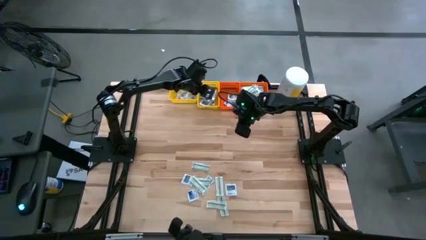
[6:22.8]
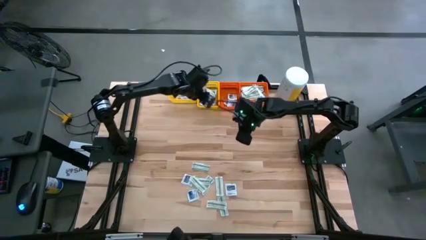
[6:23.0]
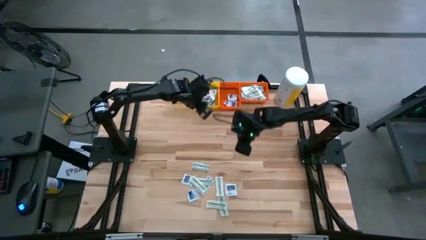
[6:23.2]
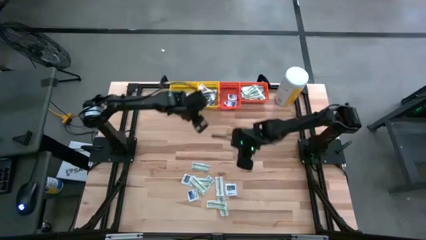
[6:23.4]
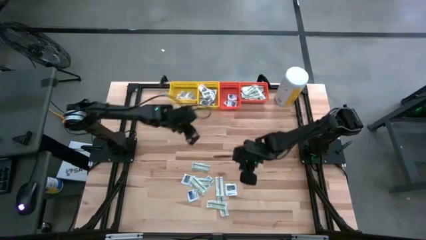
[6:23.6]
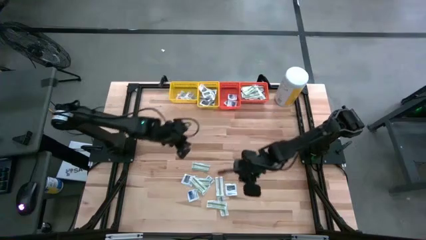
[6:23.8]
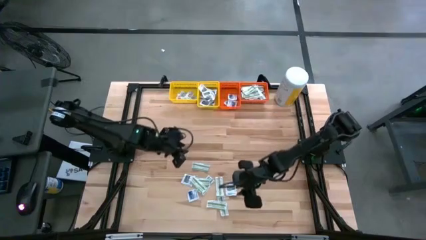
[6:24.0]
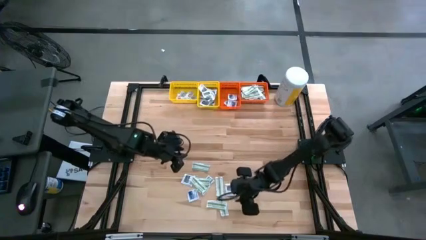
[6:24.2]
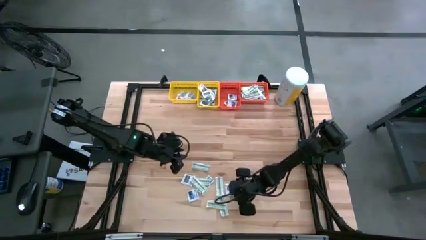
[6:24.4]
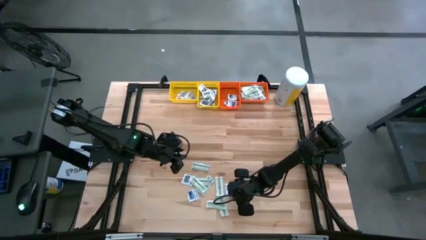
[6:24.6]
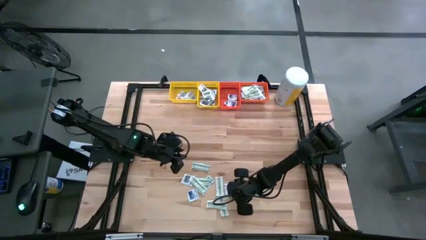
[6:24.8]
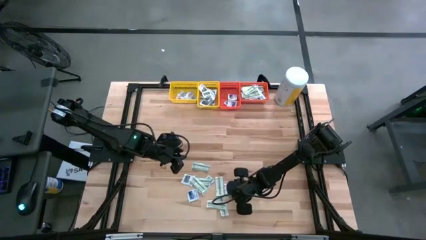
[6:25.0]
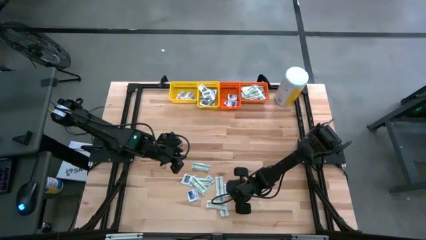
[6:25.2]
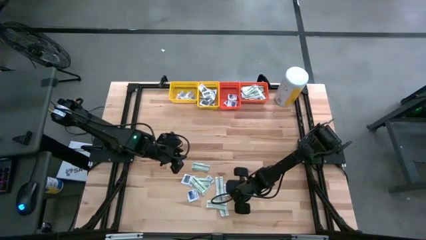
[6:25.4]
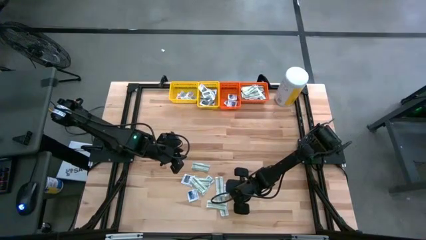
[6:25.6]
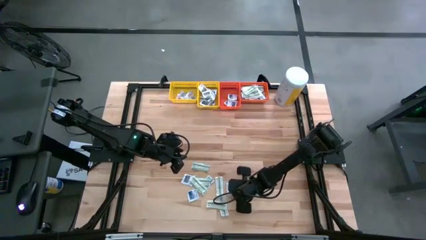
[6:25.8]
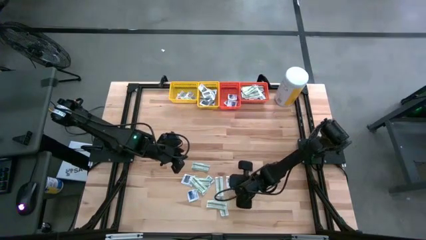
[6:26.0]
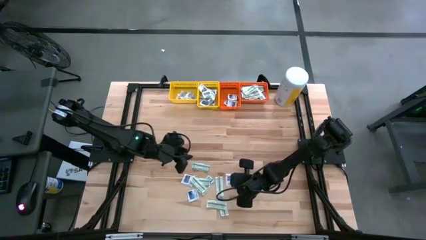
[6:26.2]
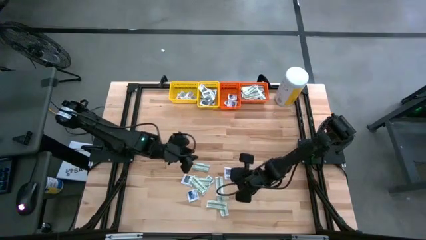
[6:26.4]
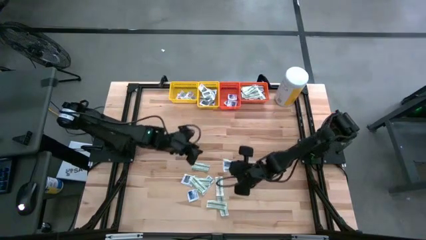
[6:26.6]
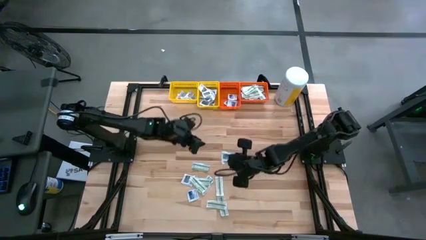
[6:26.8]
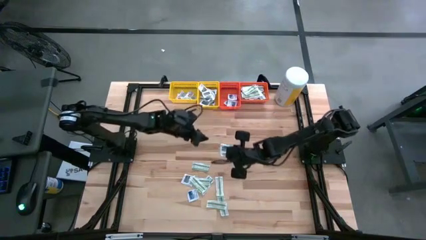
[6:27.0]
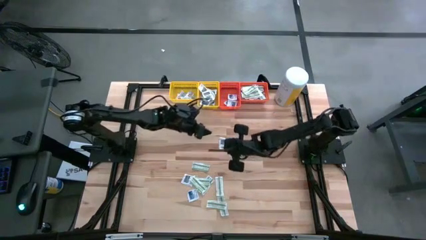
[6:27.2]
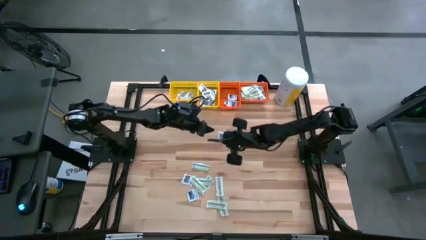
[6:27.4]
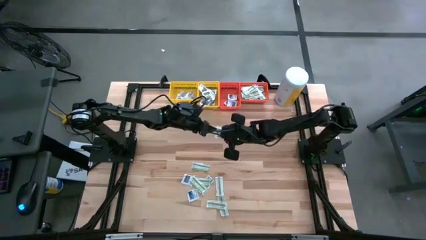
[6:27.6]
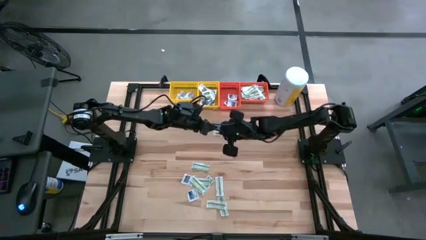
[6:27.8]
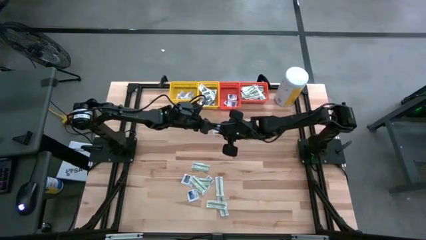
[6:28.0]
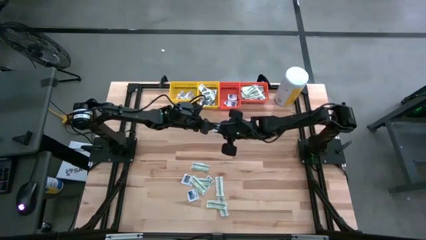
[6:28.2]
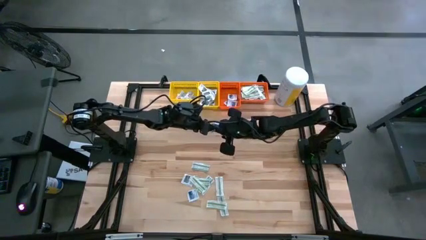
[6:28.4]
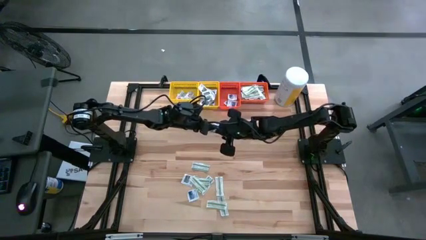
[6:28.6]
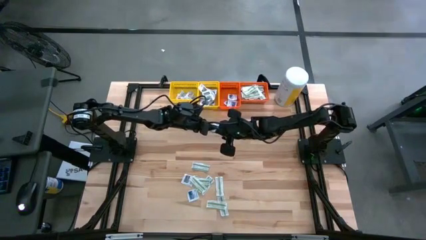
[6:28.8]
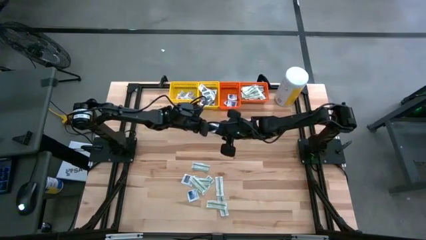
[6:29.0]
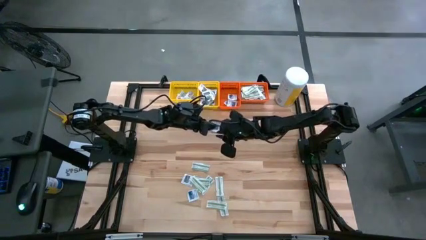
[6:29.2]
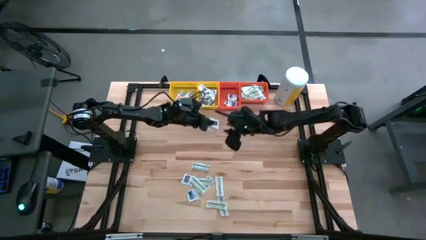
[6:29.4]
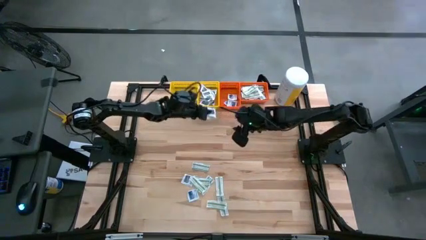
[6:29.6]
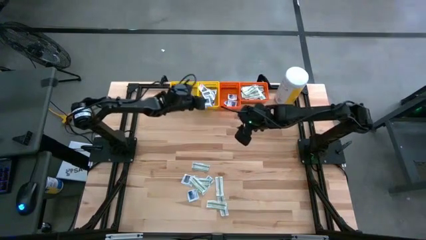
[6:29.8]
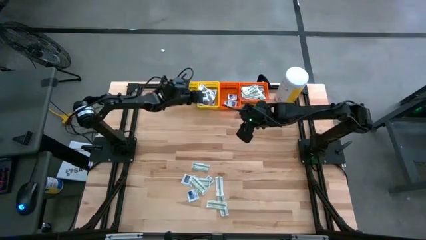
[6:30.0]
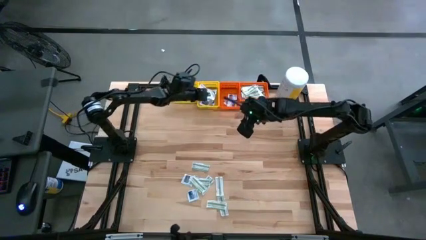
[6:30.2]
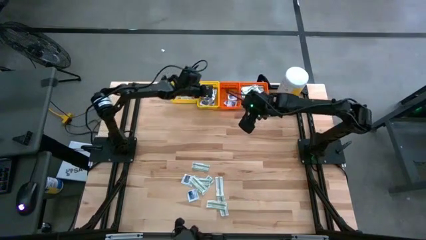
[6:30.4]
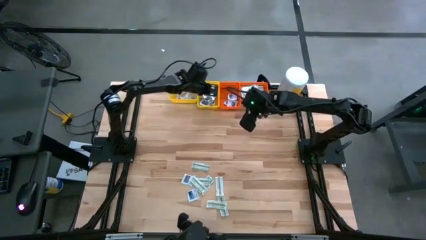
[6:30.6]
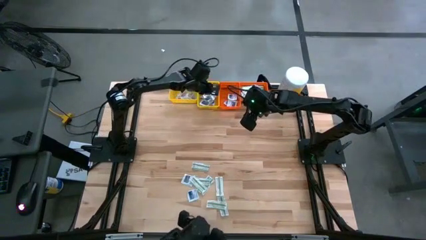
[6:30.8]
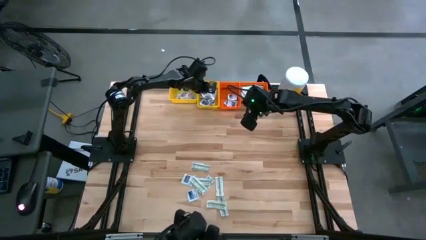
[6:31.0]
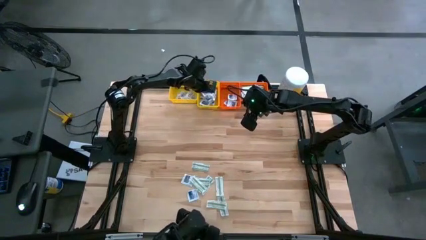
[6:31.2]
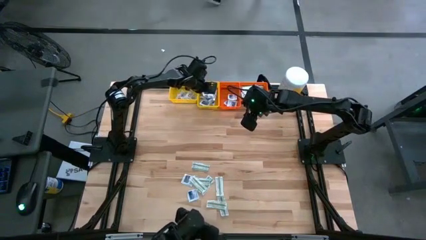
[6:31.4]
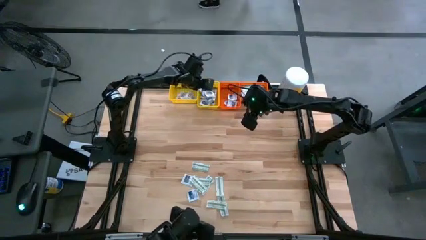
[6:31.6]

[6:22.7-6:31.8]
Task: Pick & Place First Aid Supplies
Put the gray packet into the right yellow bin

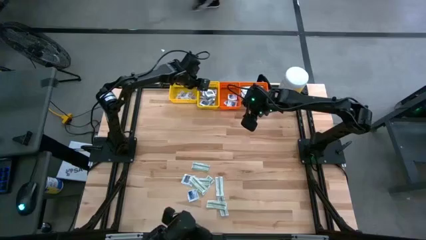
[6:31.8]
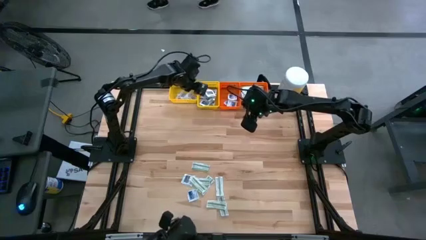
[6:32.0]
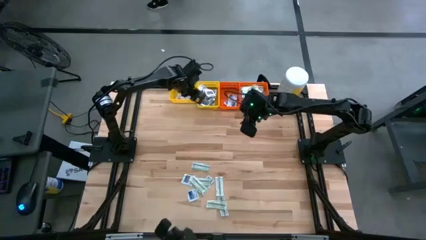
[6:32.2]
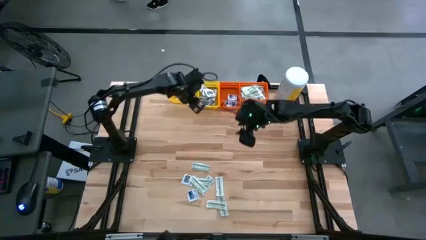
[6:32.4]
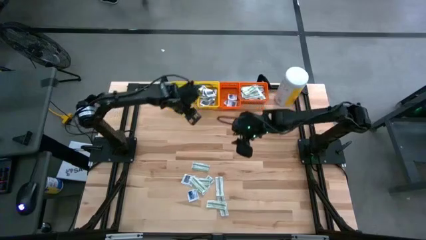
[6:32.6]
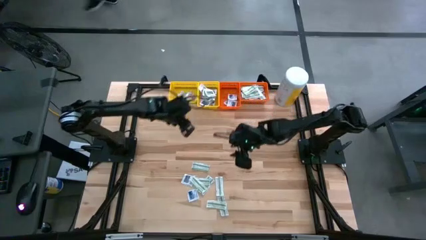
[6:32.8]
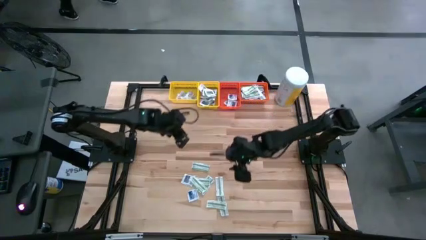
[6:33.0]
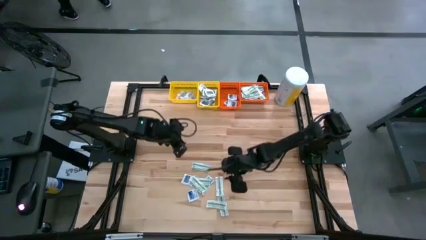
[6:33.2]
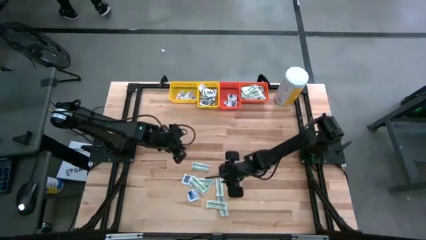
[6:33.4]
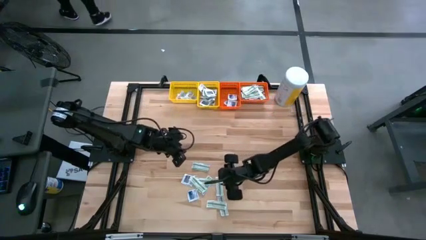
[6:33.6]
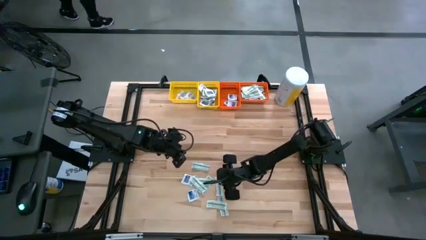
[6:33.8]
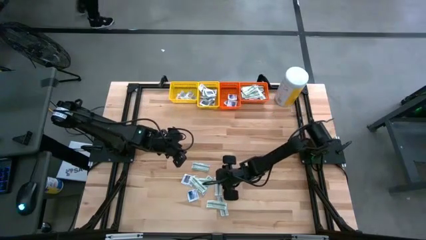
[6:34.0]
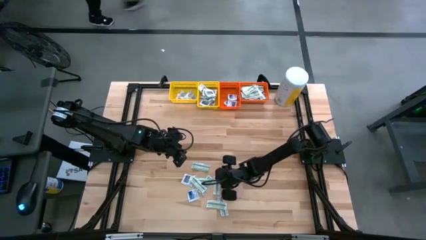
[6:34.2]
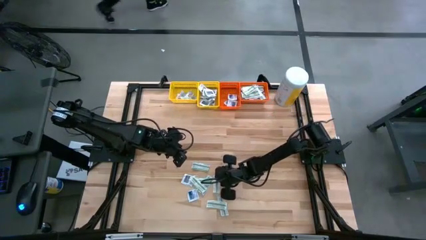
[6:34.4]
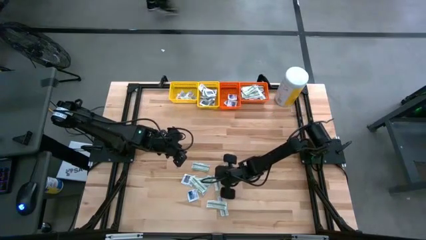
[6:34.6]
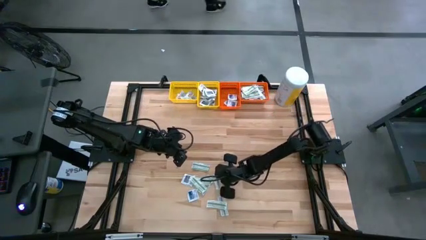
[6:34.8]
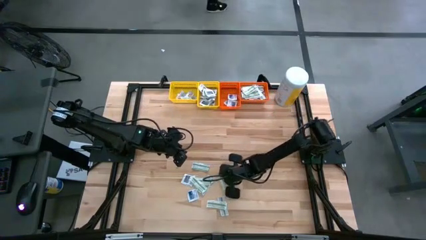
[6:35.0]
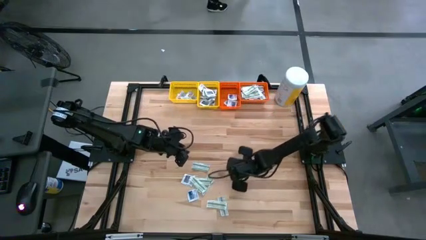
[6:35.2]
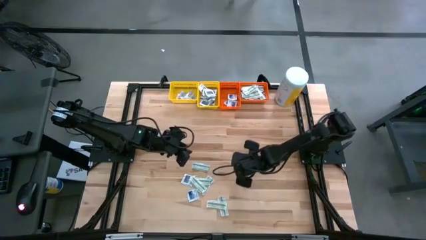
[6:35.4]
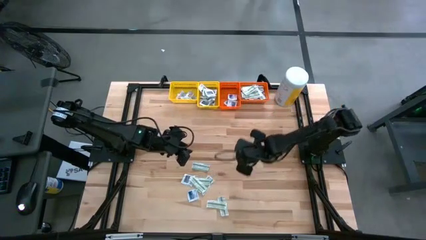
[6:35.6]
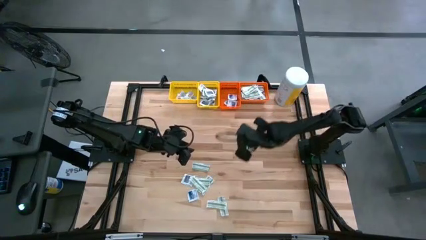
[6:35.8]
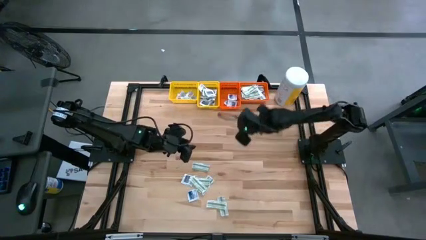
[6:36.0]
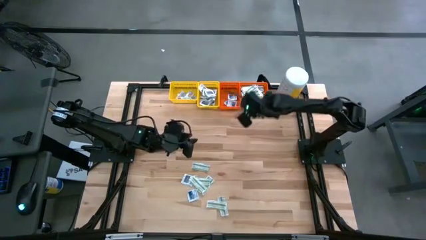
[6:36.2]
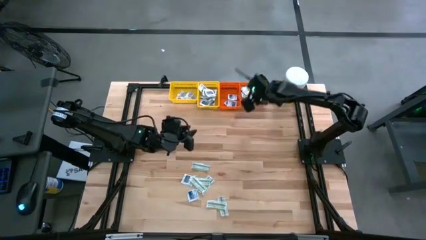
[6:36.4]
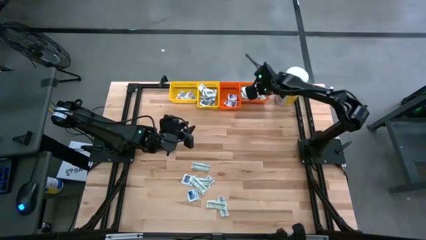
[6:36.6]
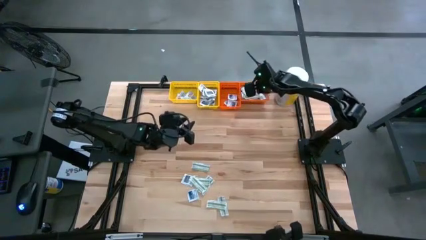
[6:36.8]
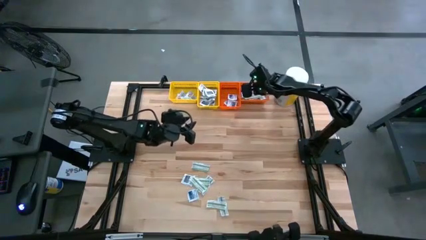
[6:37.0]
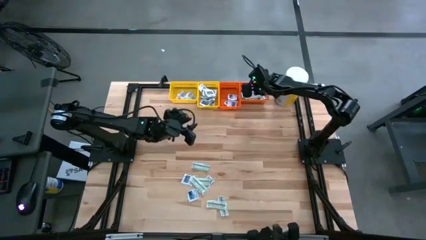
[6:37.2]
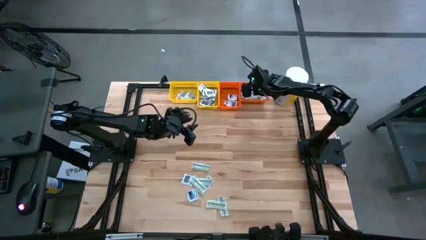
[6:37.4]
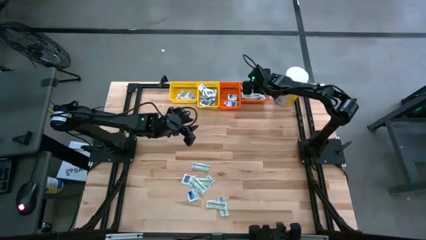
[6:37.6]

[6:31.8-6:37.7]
Put the green pad into the right orange bin
